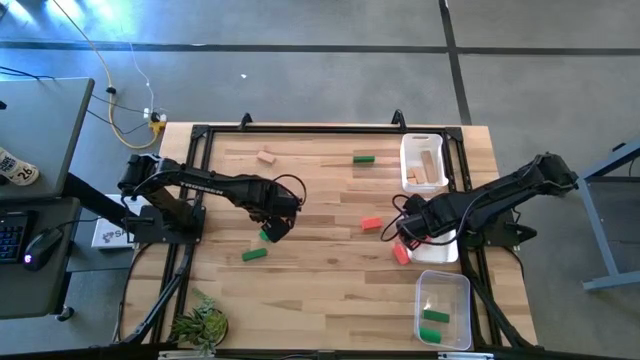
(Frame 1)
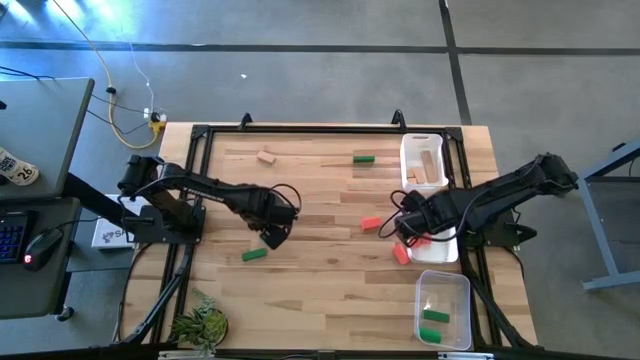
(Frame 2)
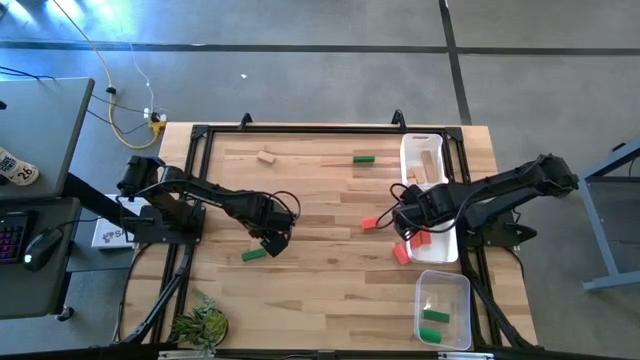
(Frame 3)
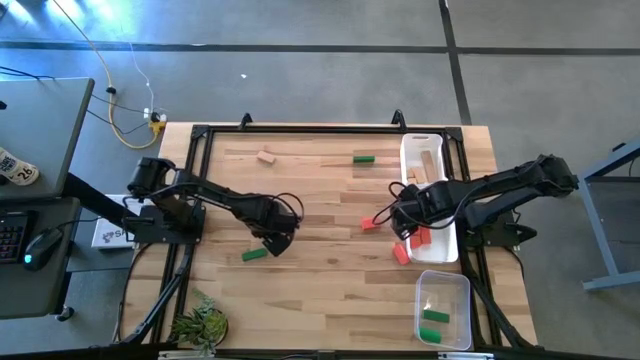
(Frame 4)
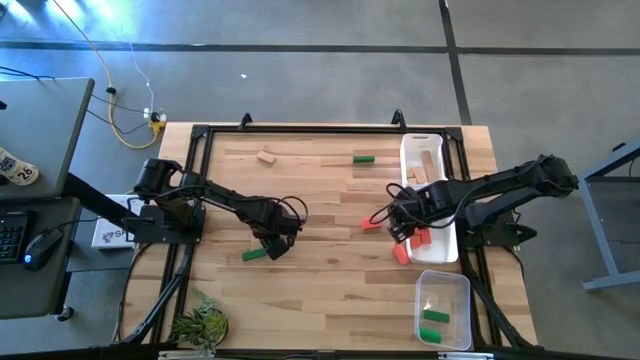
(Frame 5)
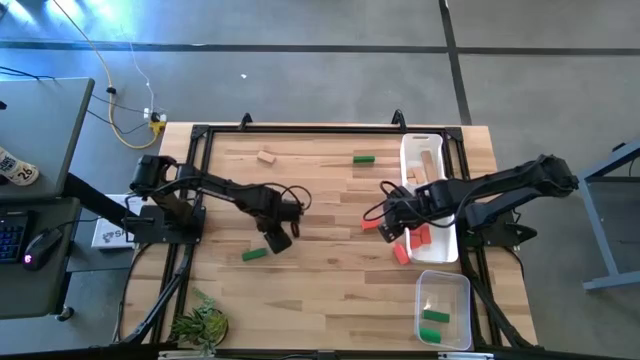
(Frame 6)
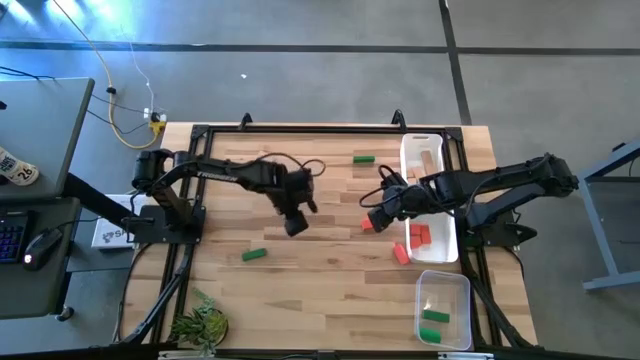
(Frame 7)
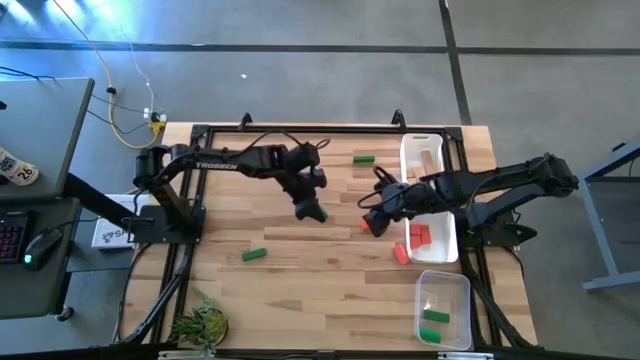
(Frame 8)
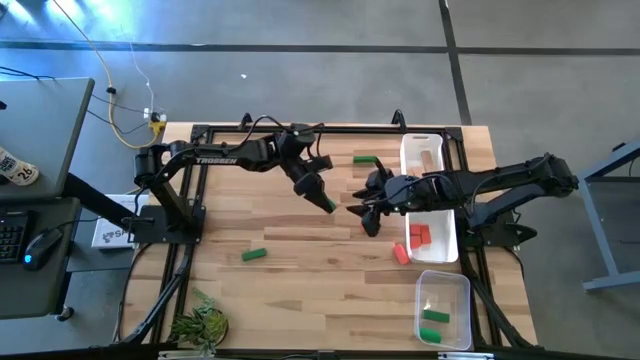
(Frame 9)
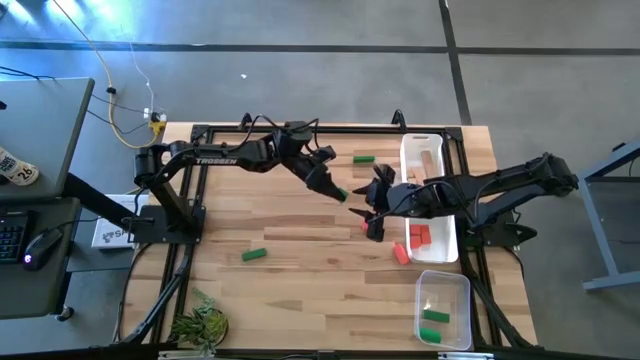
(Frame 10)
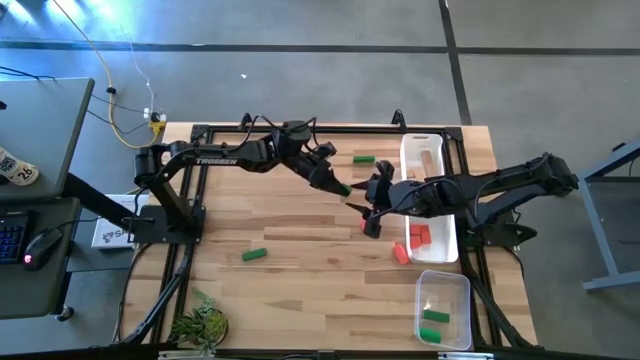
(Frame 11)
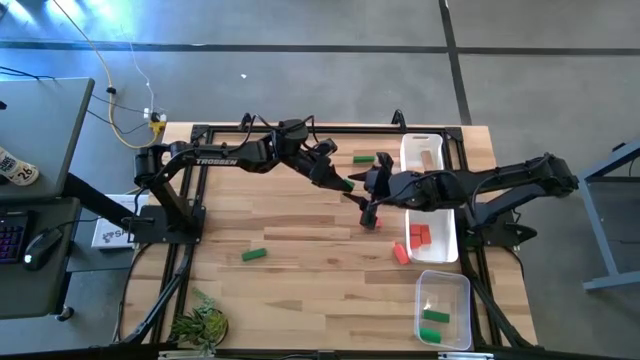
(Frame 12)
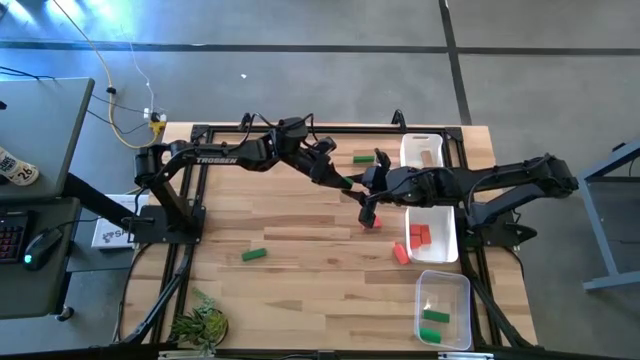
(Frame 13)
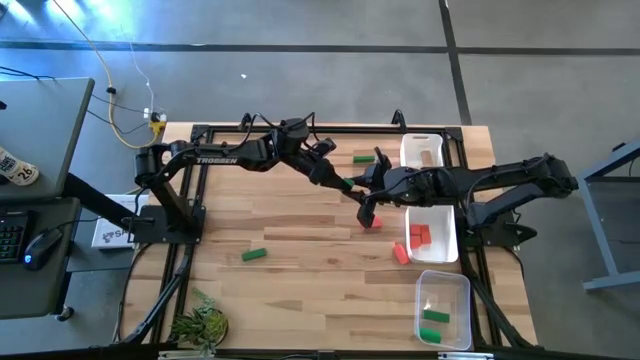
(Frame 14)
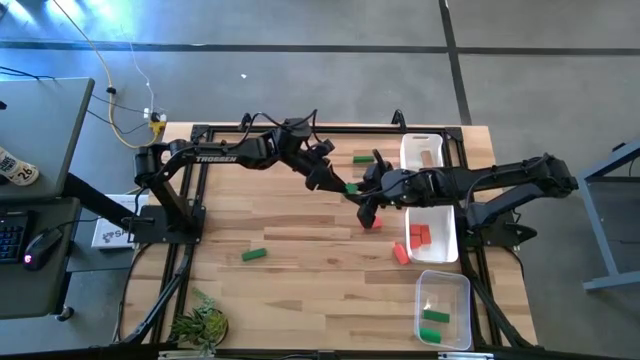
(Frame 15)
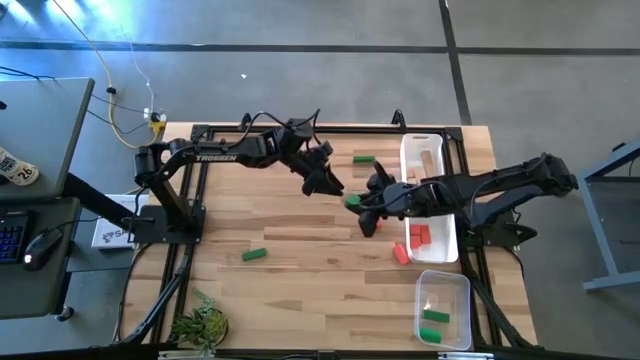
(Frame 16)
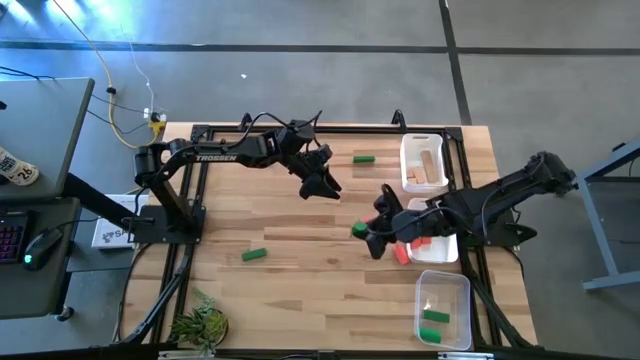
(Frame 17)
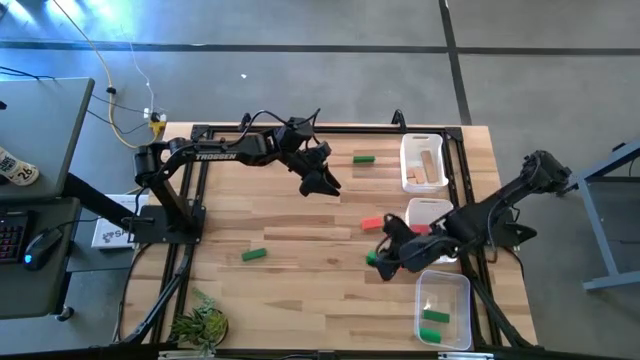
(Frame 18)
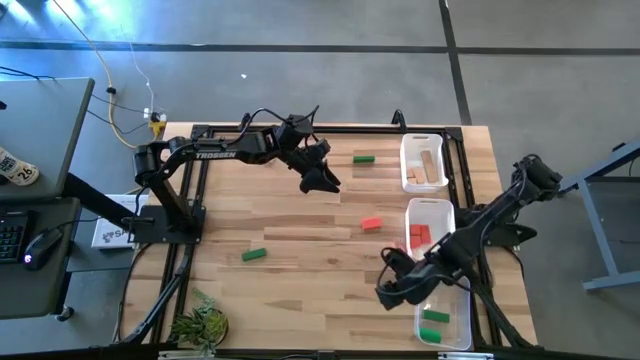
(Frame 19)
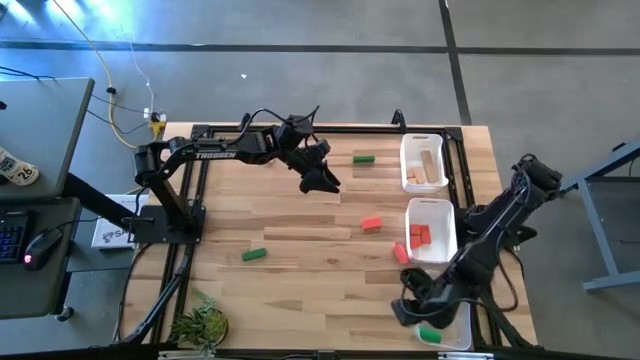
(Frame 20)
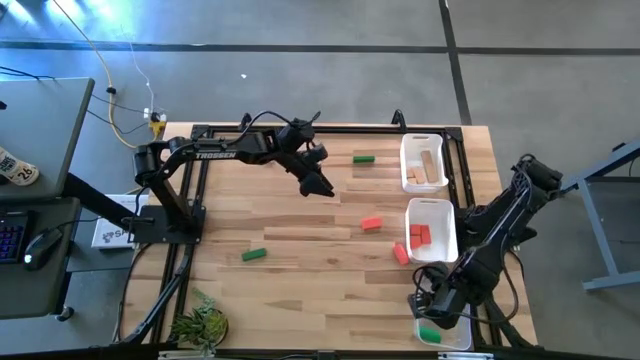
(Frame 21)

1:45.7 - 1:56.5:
Task: Sort & place blocks by color
Put the green block into the transparent bin

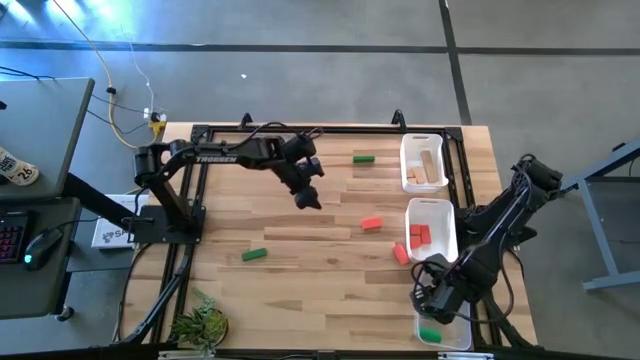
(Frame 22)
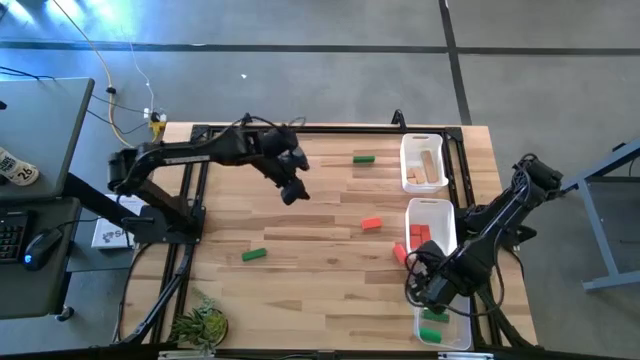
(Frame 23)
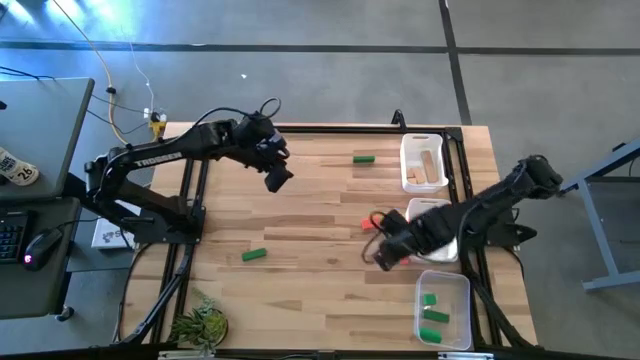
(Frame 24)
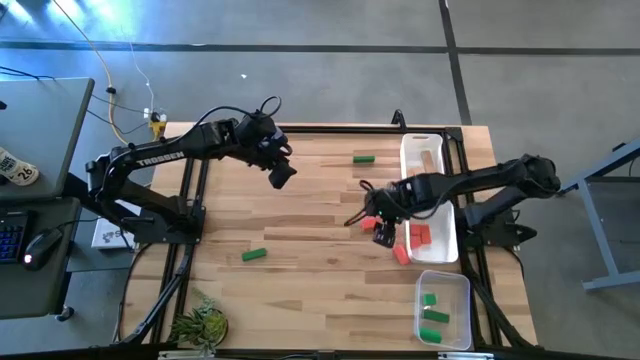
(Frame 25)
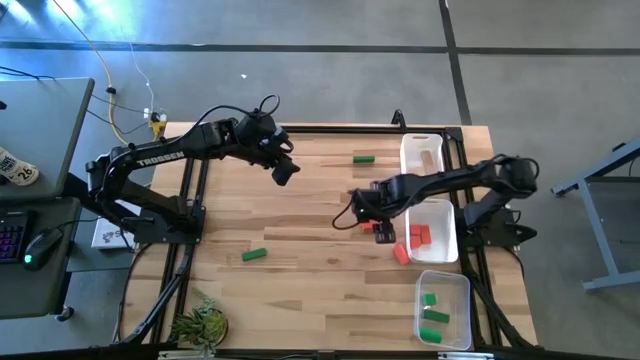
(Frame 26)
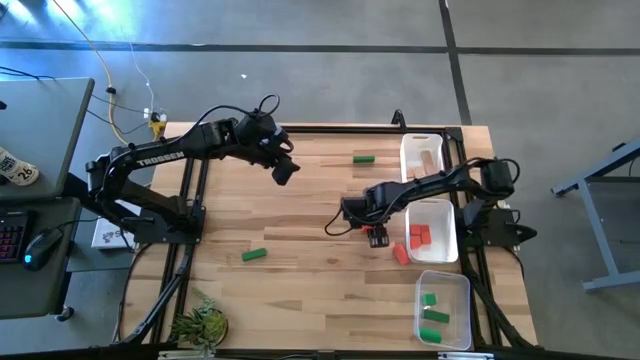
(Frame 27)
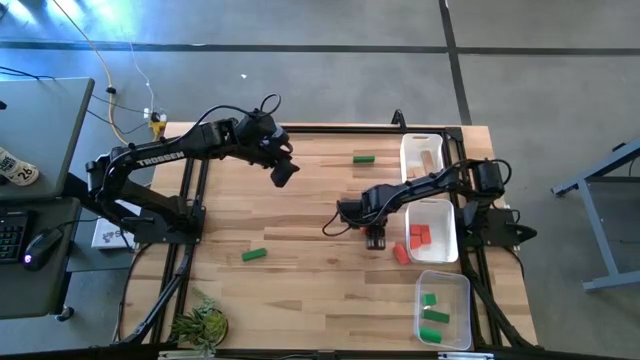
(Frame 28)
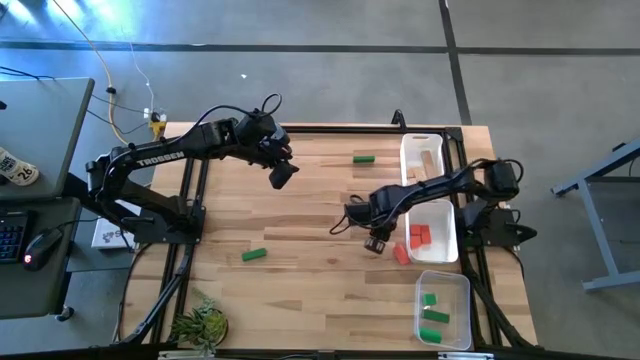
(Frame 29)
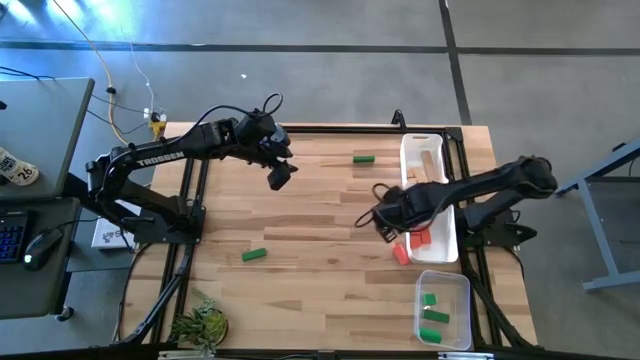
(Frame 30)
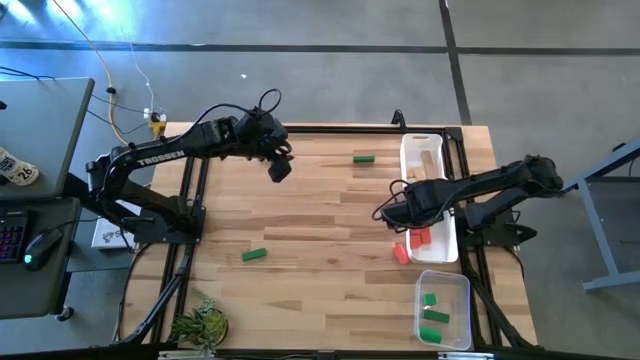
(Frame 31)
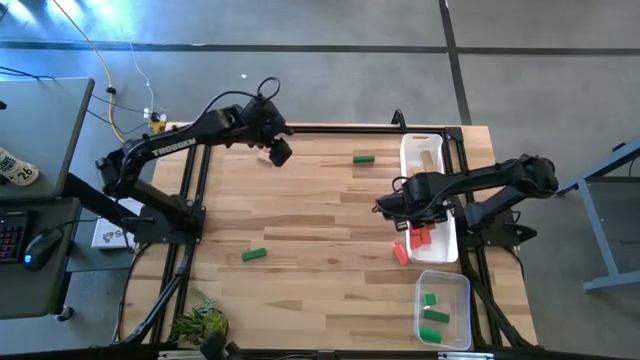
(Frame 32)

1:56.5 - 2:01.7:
Put the orange block into the bottom white bin

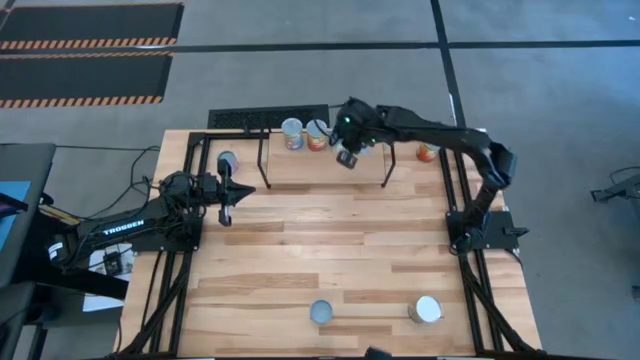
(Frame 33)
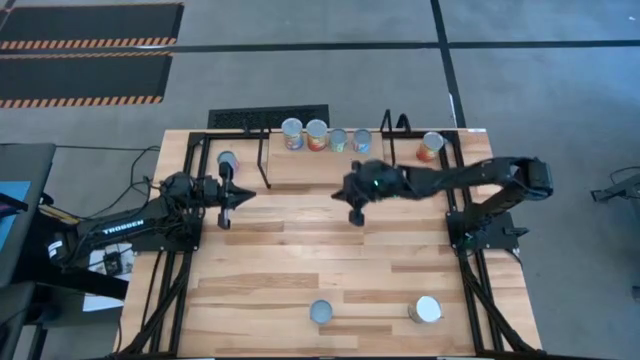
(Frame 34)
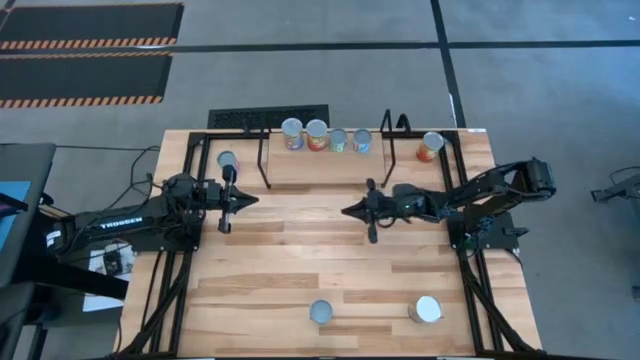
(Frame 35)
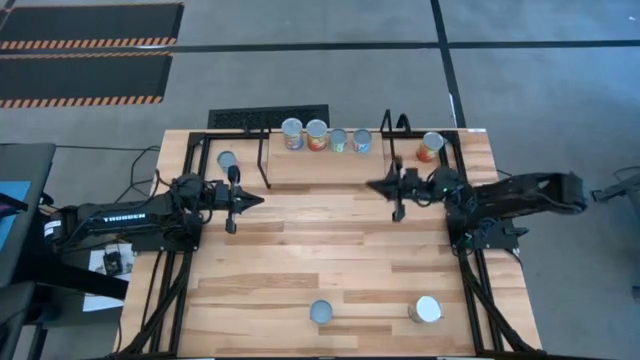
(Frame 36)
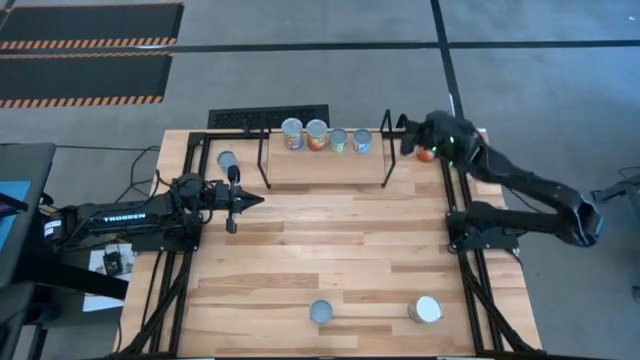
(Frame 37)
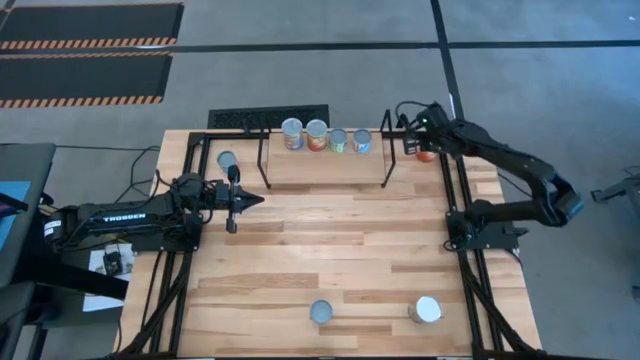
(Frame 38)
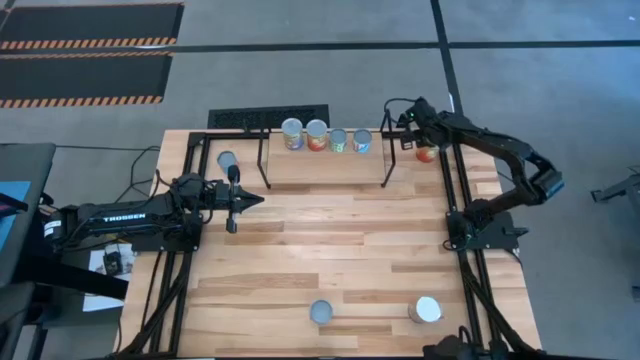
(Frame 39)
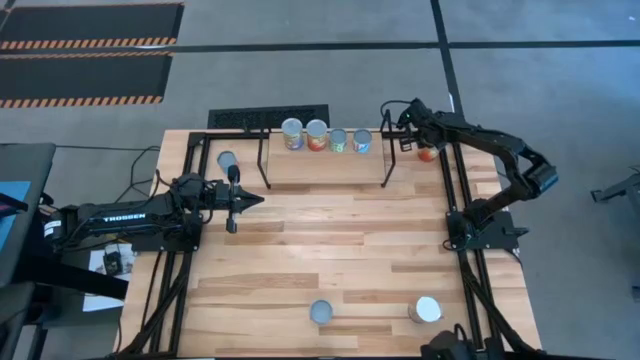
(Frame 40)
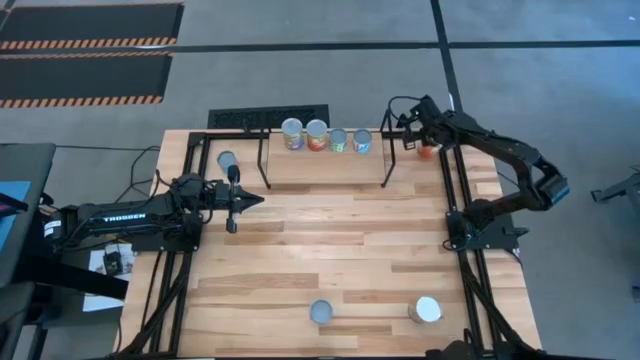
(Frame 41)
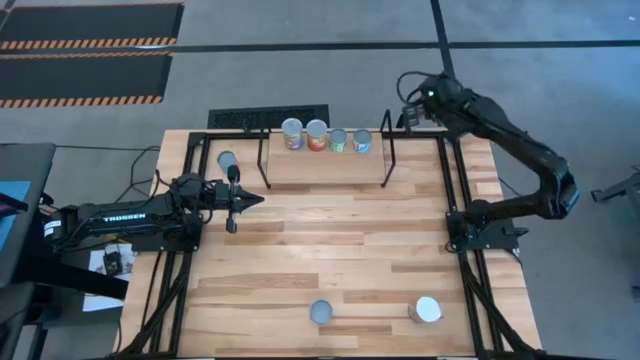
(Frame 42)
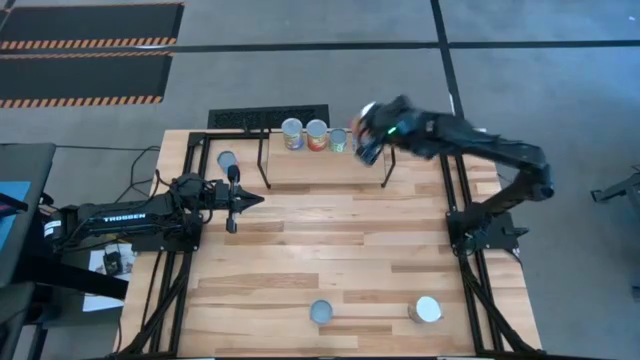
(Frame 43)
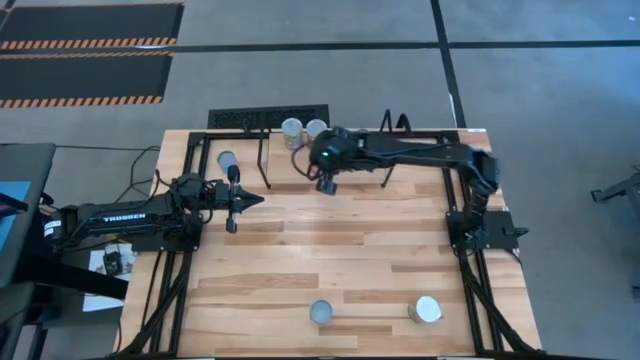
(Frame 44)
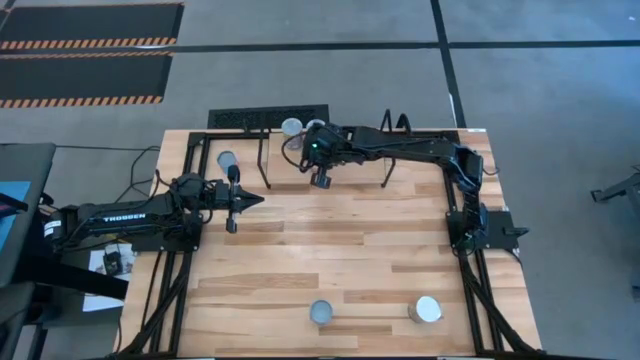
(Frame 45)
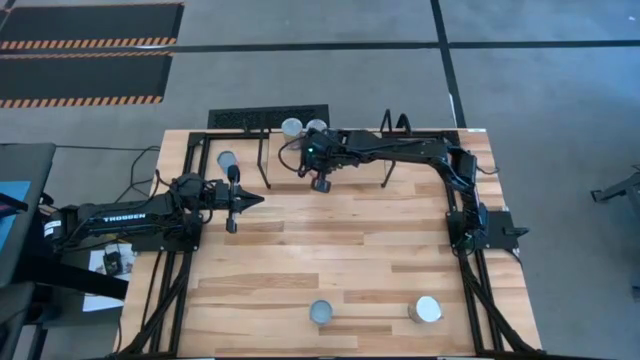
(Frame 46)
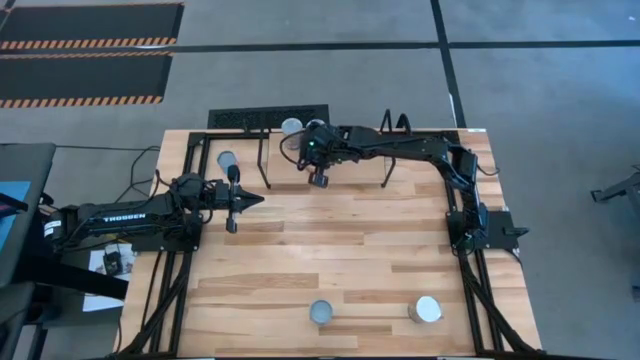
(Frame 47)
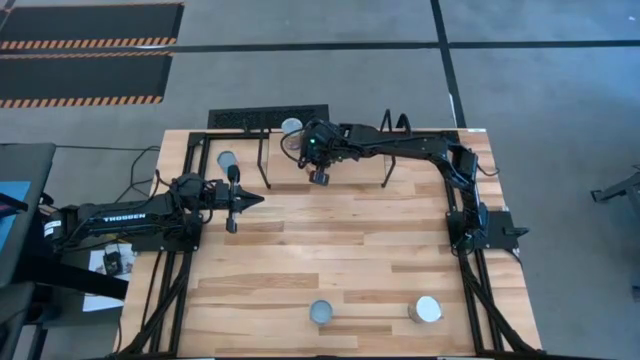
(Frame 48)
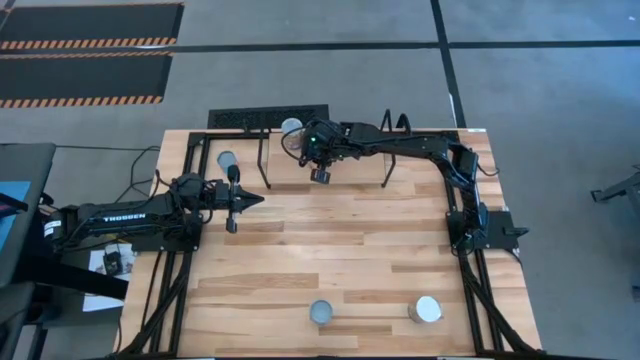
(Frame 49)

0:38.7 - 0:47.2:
Task: Pick and place cans onto a shelf
Put the canned corn aligned with the other canned corn on the shelf
